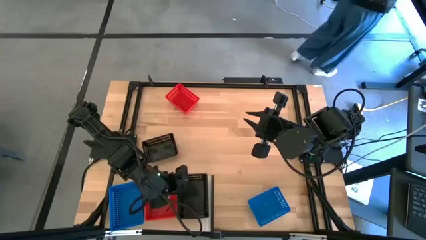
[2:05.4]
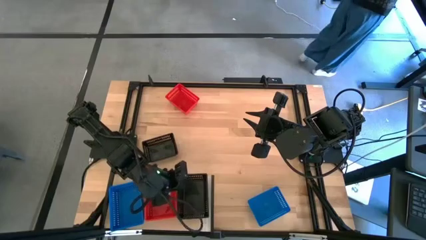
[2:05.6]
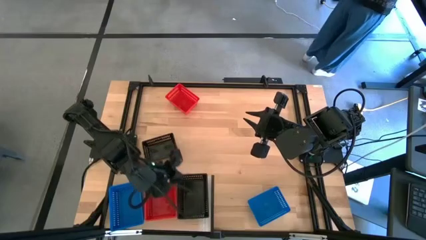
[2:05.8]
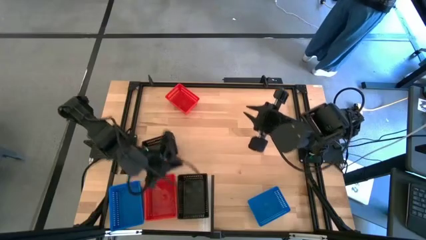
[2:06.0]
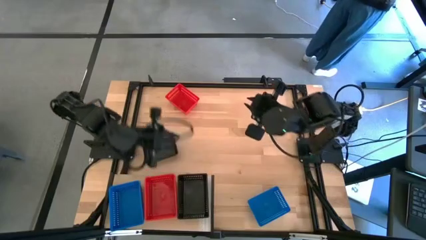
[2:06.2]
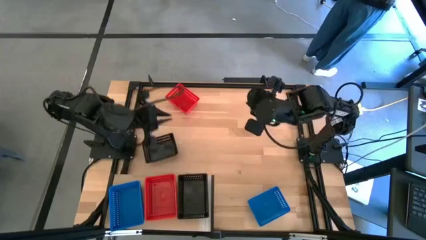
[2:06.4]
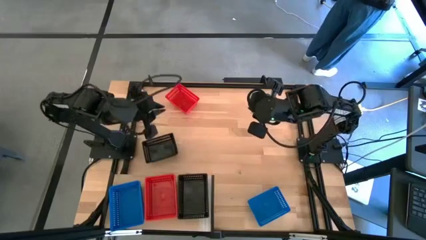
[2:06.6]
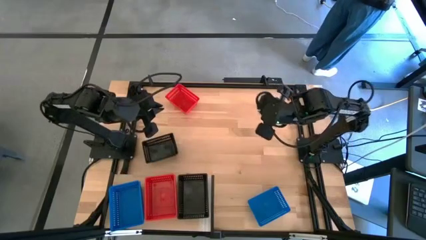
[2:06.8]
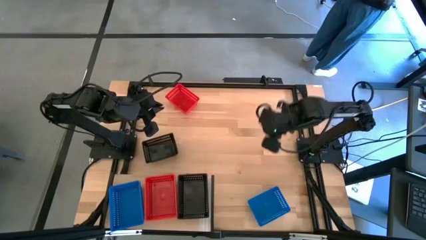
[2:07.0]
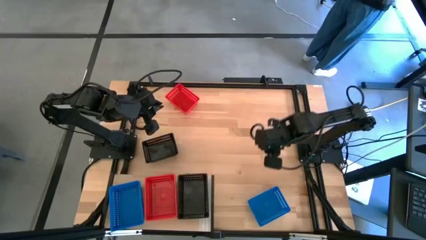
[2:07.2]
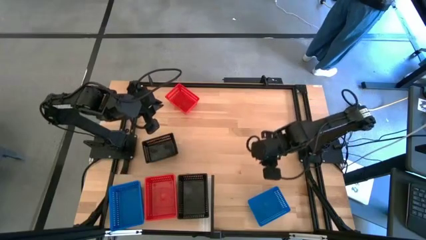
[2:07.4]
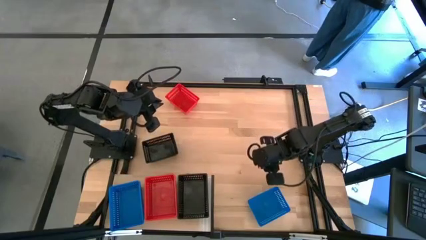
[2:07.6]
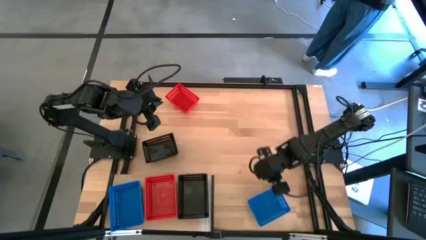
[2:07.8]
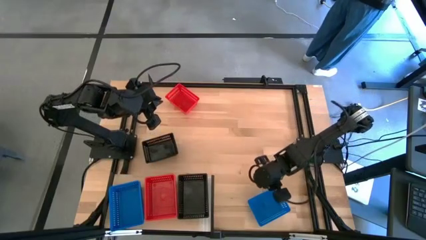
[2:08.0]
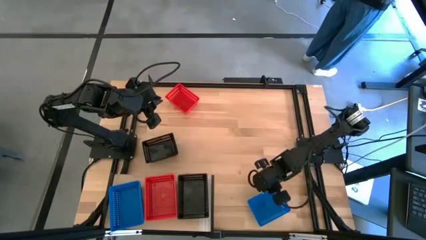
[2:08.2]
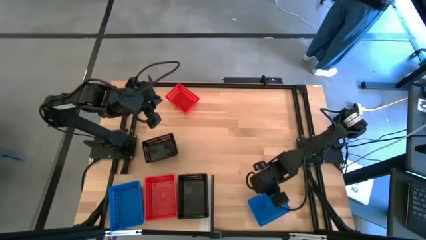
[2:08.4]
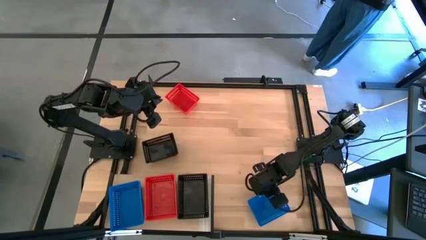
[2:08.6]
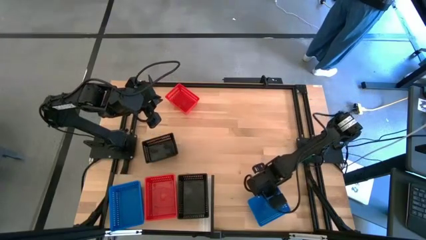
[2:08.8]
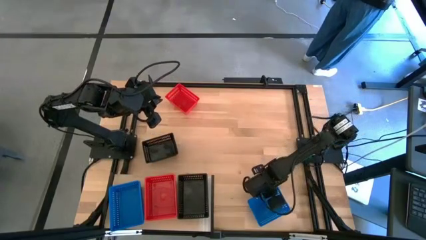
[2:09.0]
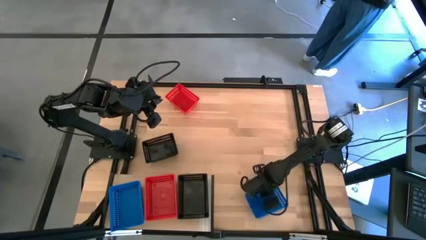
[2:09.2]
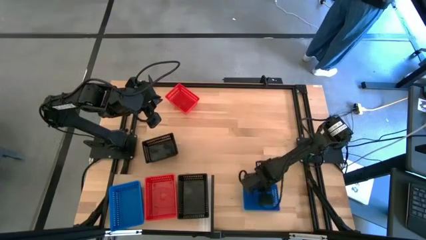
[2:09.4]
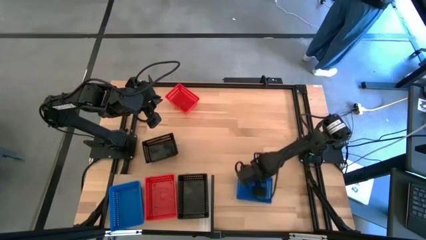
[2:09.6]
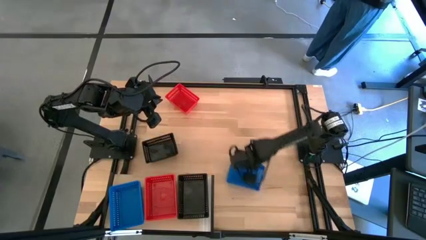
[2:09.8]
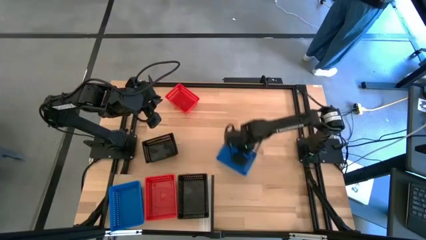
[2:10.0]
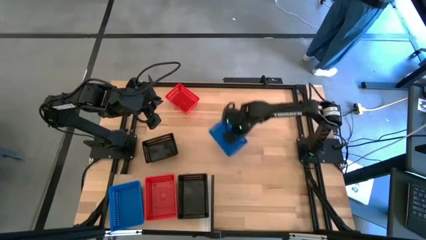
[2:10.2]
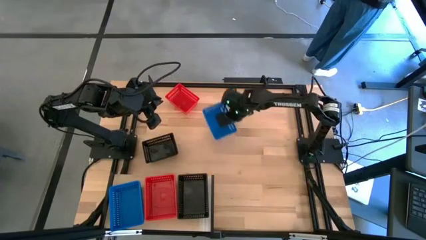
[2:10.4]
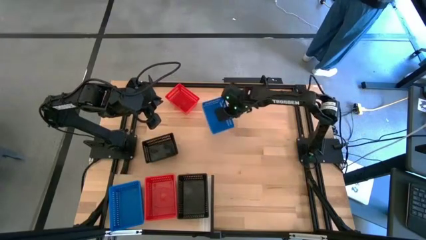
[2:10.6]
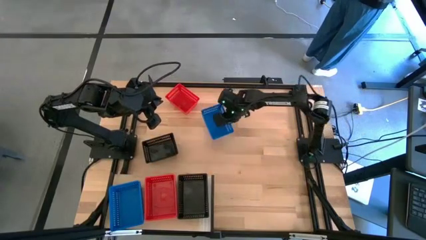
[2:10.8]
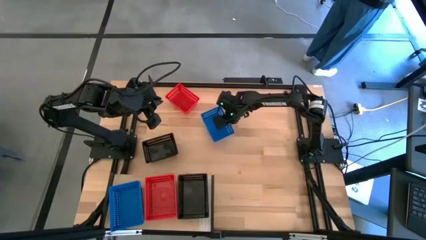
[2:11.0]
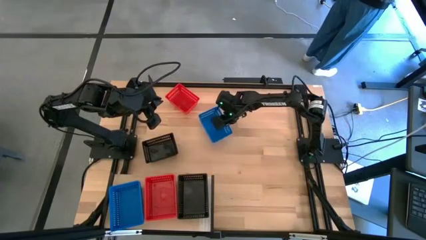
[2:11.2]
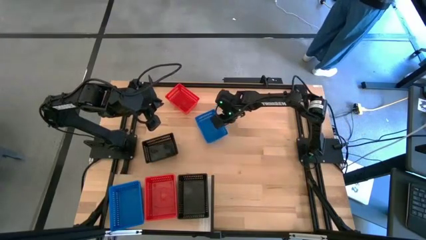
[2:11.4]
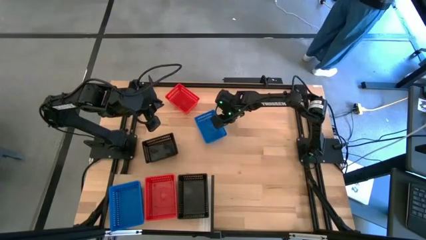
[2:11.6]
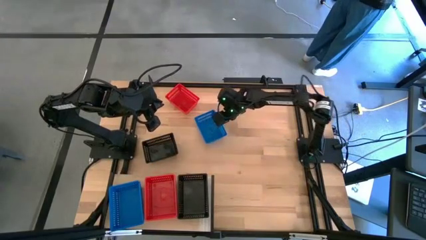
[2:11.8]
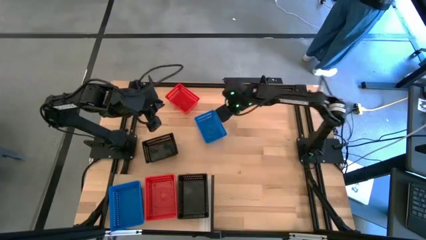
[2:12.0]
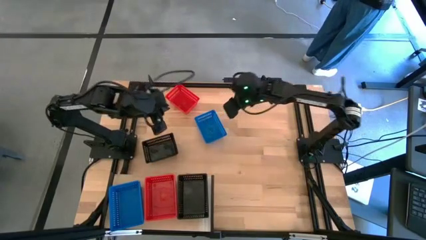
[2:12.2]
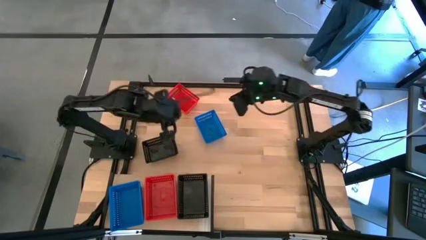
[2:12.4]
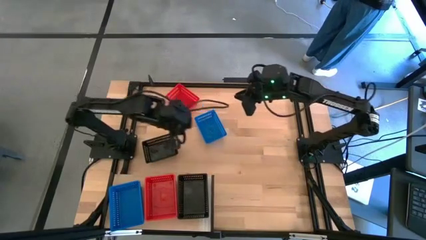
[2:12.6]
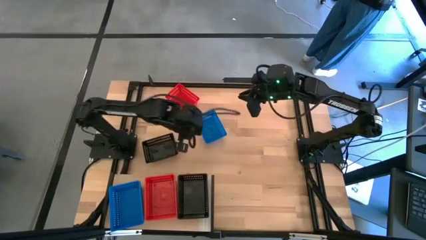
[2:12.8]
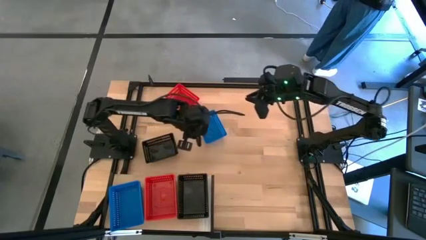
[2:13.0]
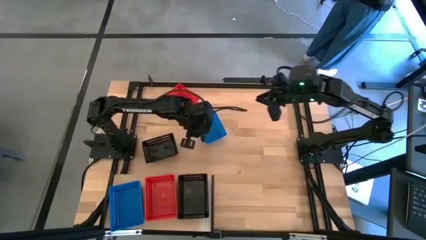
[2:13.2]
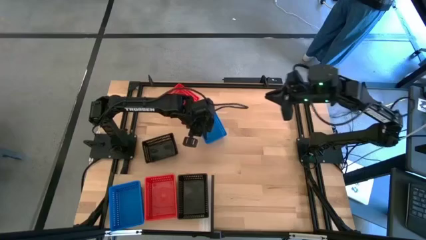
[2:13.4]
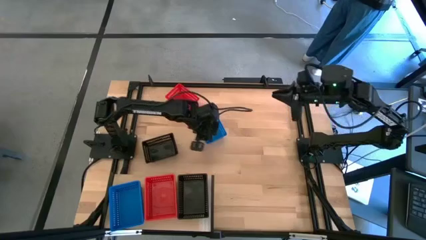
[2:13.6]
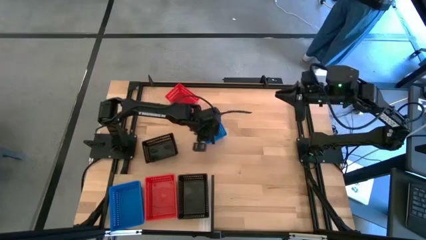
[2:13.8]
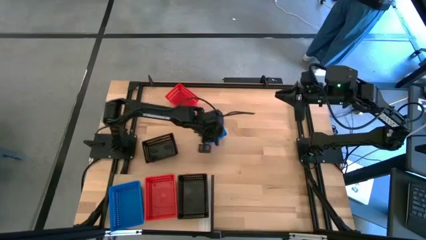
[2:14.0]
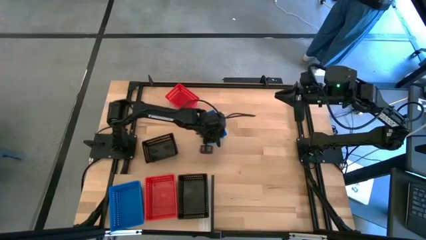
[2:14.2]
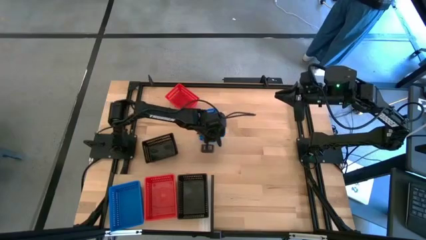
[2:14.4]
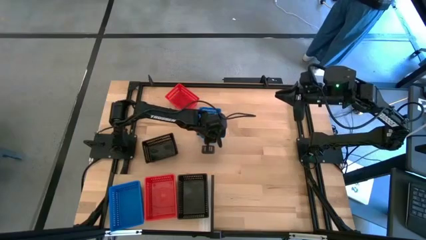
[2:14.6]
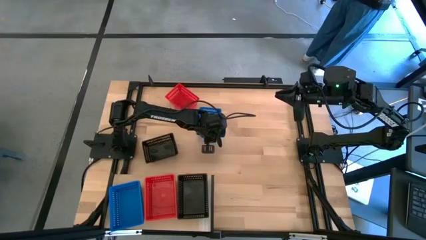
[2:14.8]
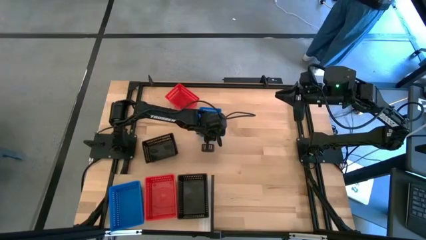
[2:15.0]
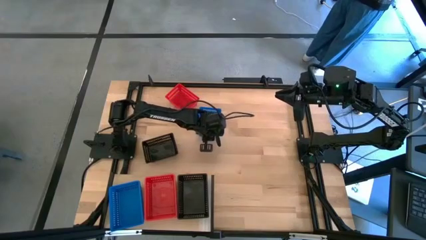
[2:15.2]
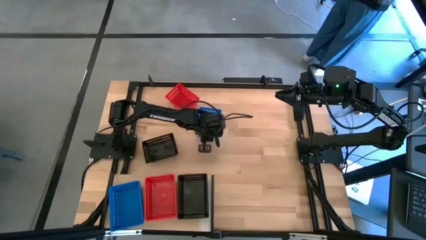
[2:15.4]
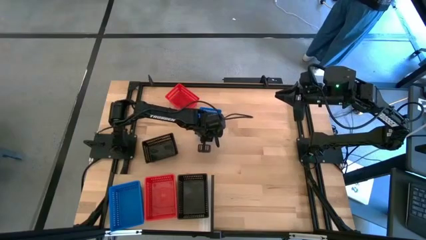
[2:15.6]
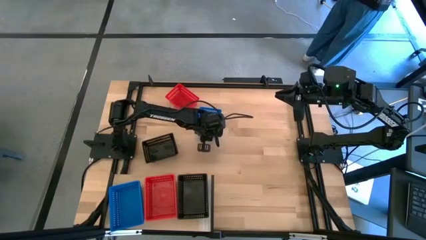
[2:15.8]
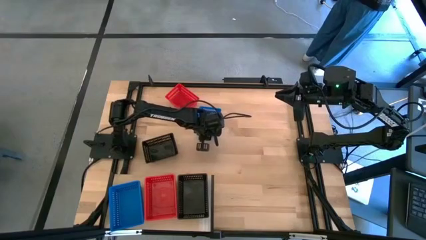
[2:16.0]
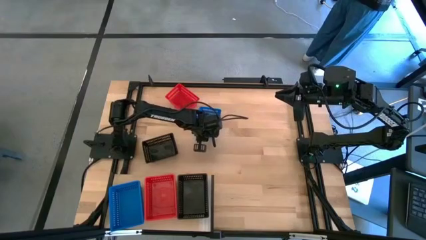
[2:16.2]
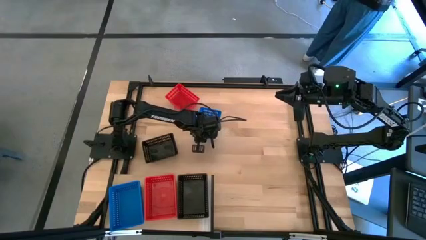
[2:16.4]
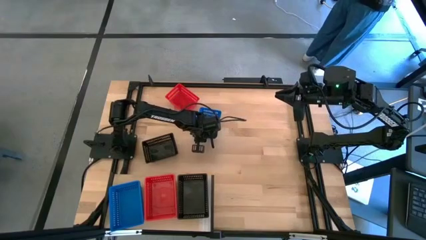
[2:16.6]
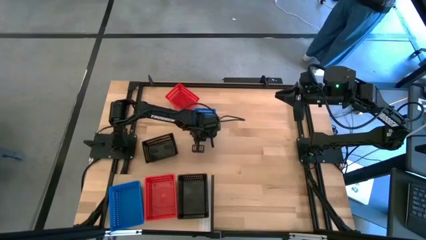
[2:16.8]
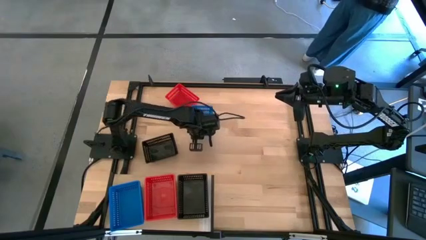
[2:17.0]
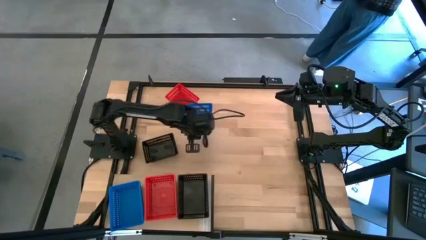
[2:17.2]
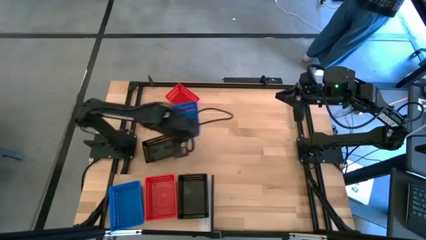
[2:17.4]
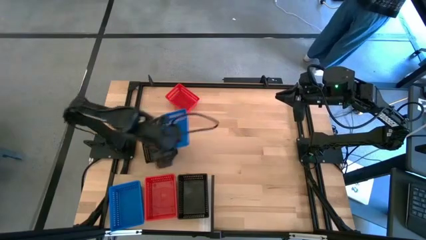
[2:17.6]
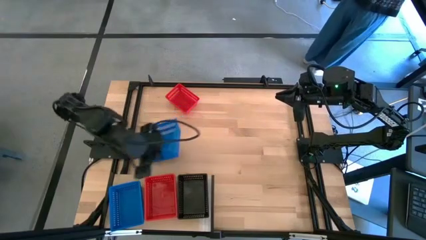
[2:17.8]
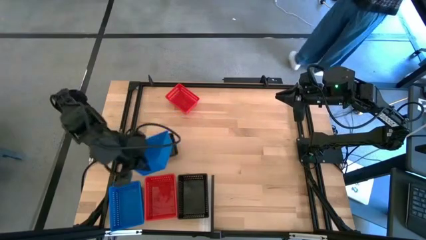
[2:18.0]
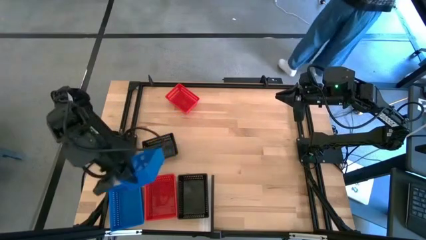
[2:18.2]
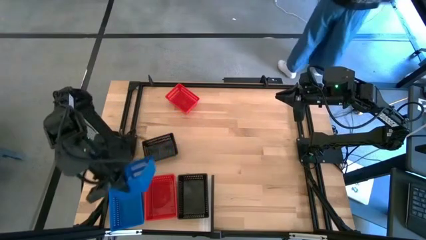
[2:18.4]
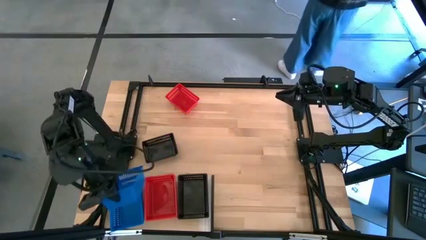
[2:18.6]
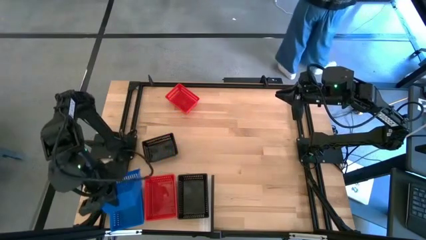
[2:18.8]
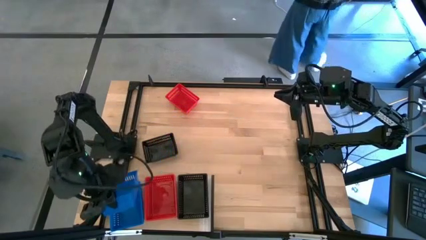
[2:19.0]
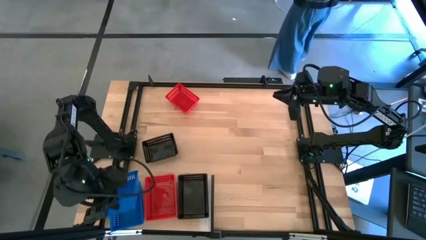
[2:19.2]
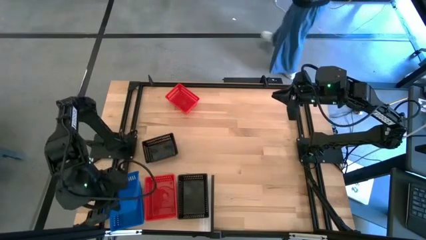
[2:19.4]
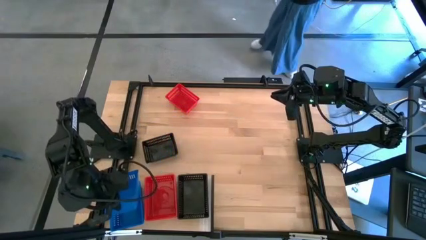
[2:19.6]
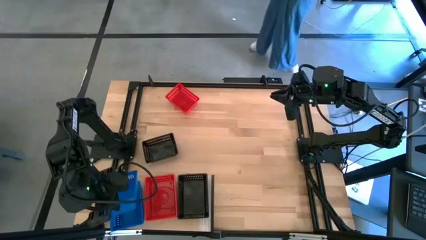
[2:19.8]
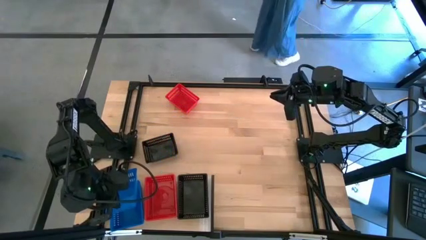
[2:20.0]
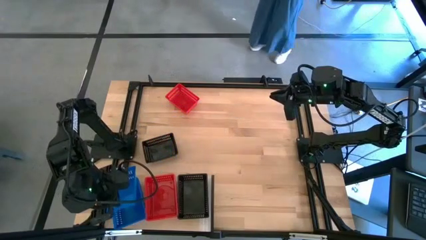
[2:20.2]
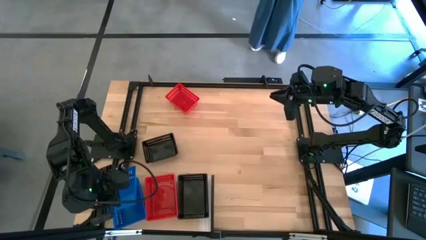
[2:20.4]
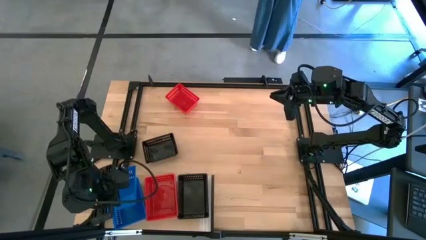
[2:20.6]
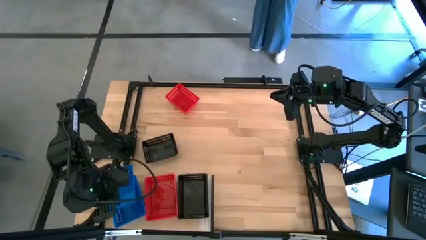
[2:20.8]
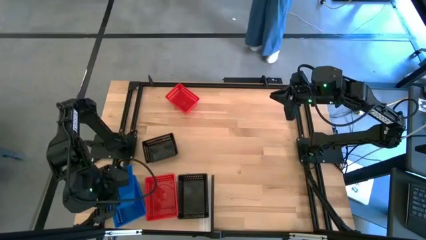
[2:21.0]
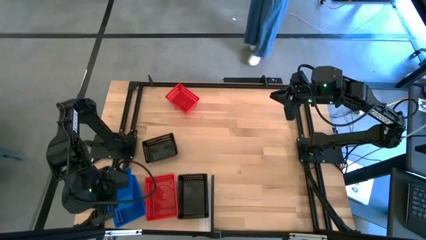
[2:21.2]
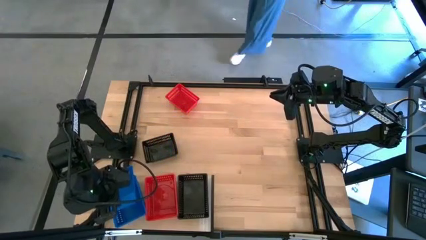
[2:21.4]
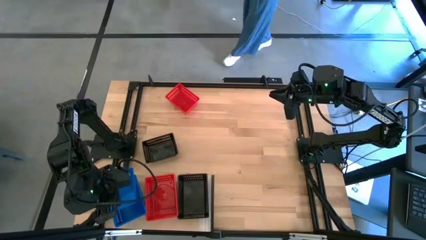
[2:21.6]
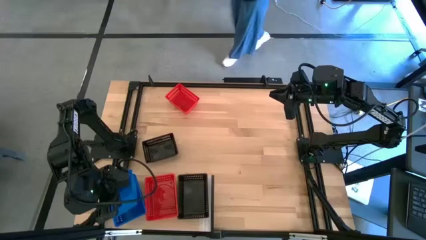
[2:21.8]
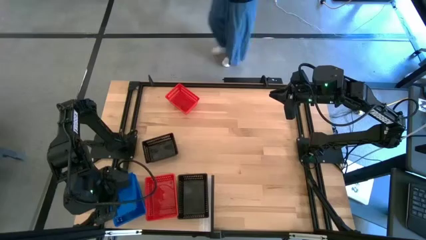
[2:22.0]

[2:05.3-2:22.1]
Task: Stack baskets on shelf by color
Stack the blue bin on top of the other blue bin on the shelf
